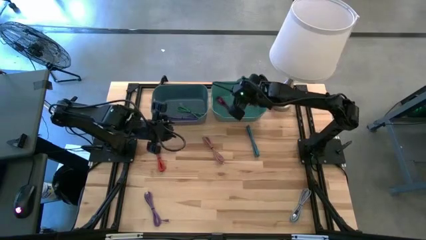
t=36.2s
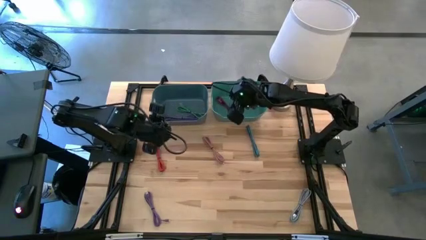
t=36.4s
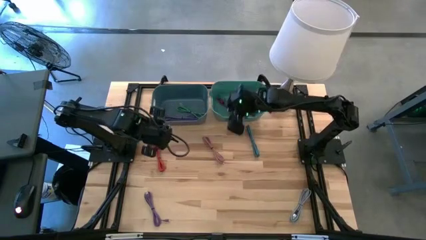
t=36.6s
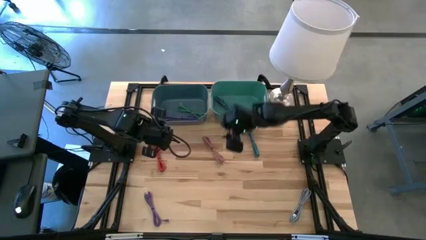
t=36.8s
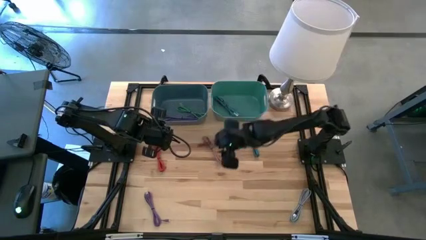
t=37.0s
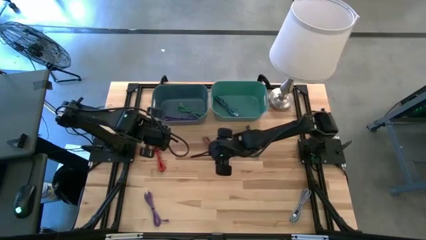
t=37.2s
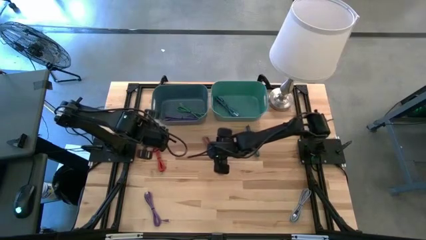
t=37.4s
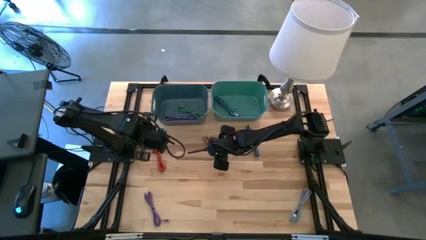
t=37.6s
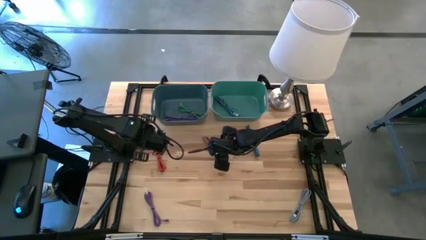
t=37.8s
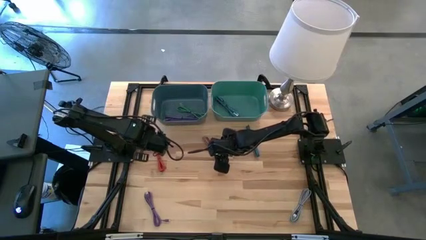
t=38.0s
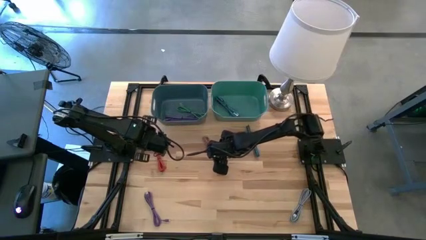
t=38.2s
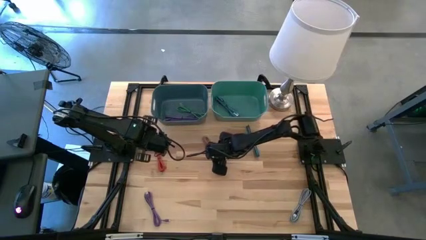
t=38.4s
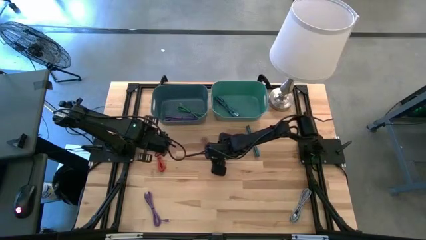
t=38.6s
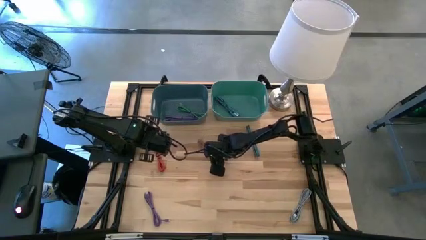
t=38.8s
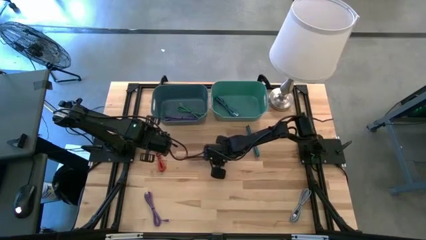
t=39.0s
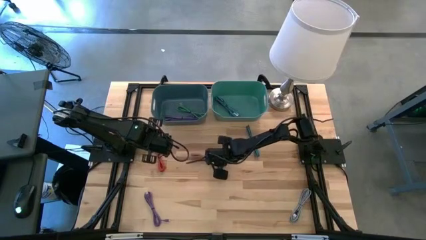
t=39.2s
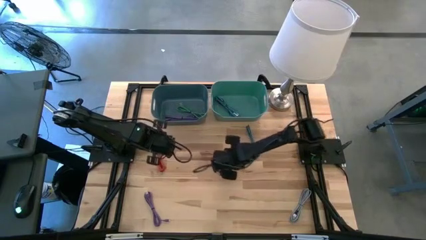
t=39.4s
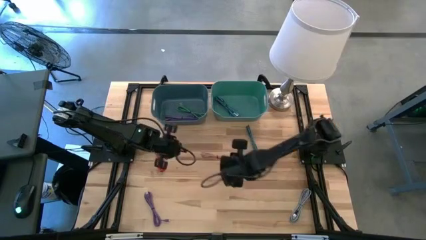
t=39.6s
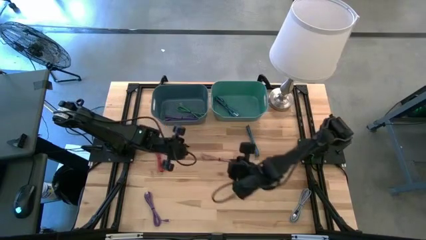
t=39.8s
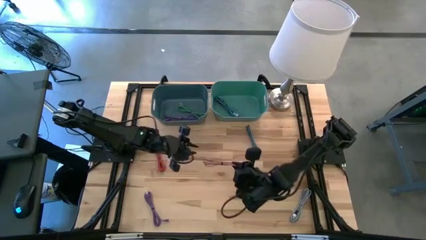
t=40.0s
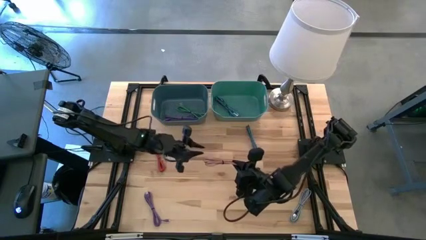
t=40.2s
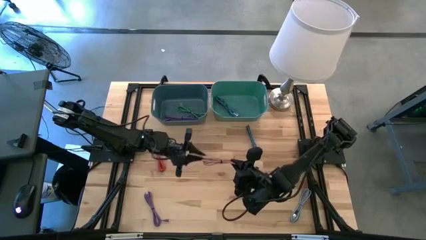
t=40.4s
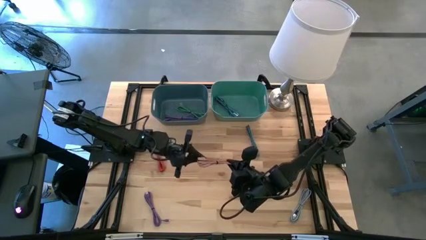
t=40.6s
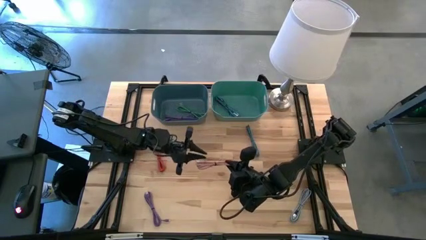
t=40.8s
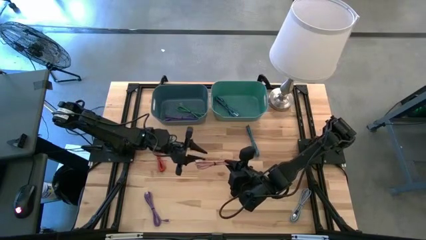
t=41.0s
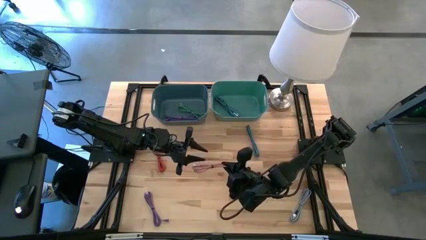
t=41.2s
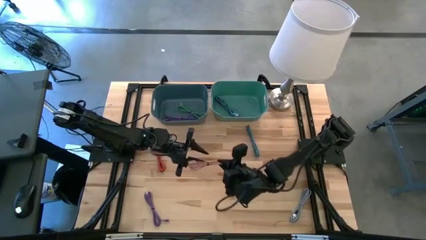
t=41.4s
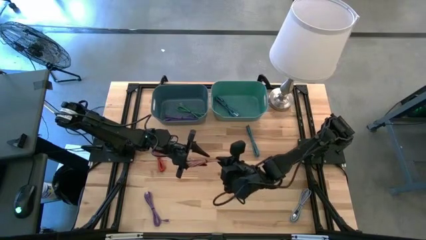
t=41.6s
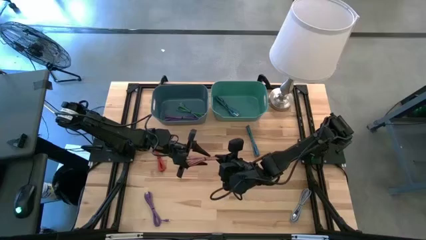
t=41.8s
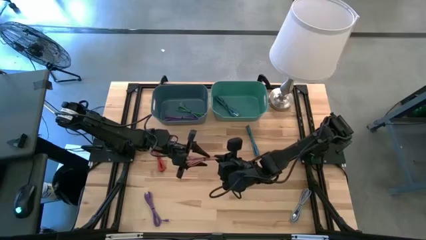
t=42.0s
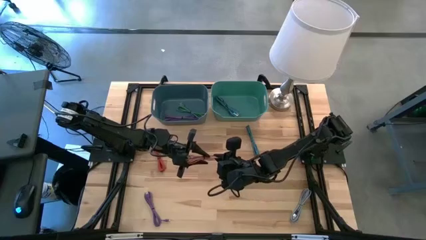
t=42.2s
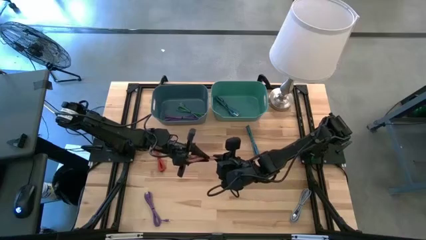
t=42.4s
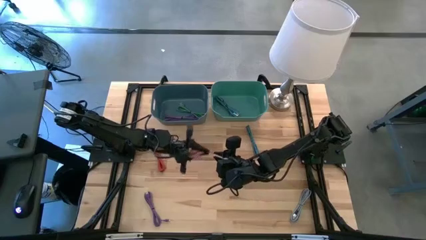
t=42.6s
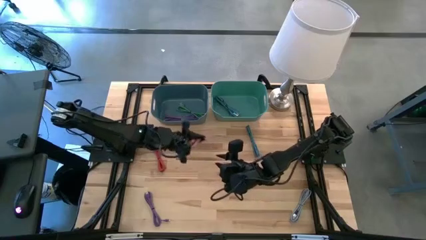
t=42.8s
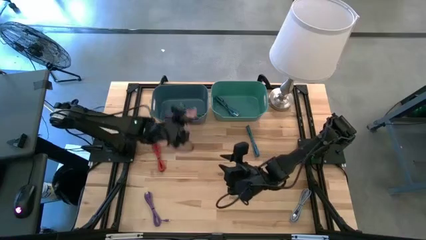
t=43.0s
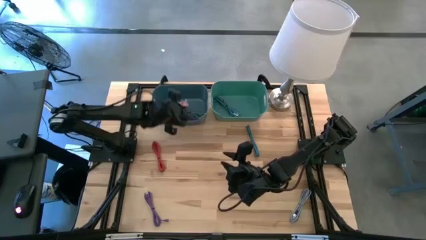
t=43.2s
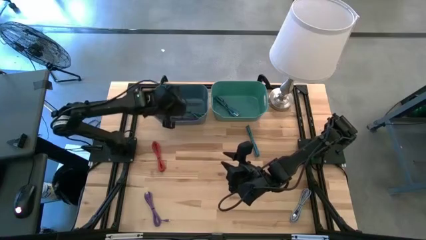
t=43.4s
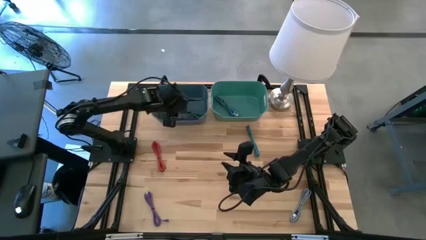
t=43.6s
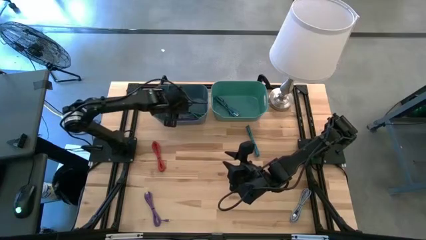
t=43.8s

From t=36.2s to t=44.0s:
Task: Pick & Place USB Port
Put the pink usb cable into the blue bin

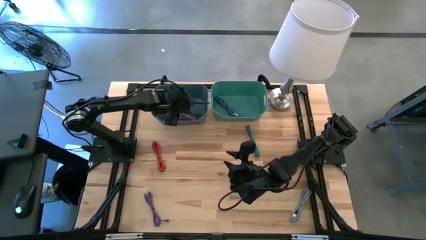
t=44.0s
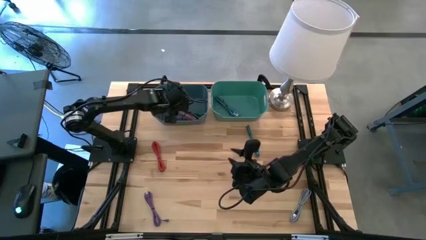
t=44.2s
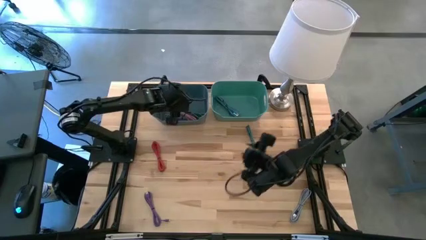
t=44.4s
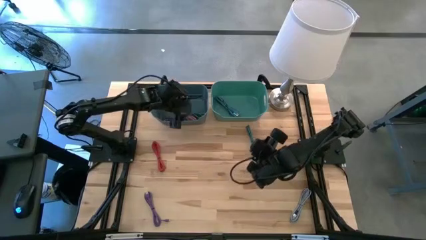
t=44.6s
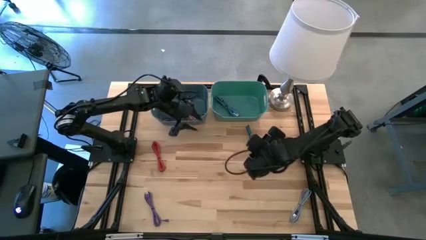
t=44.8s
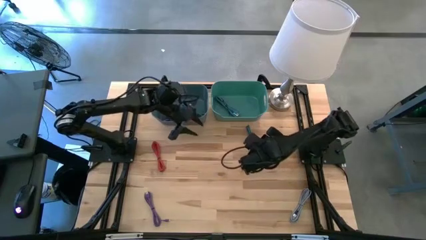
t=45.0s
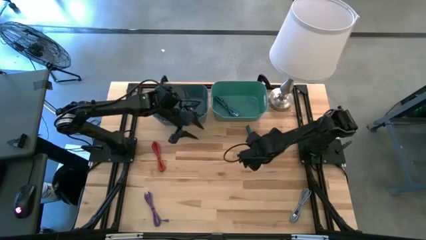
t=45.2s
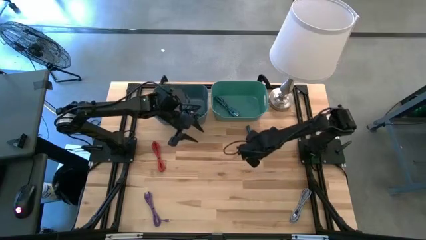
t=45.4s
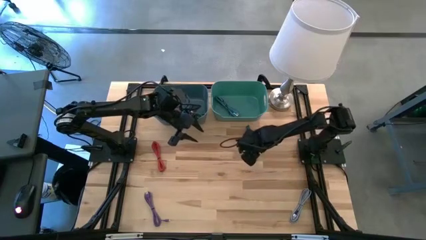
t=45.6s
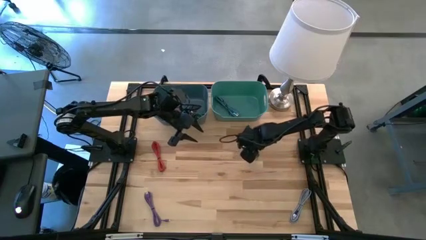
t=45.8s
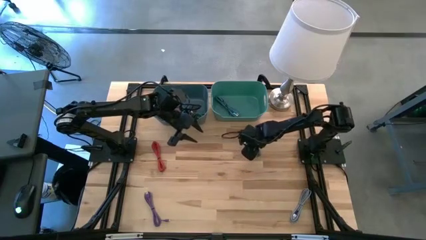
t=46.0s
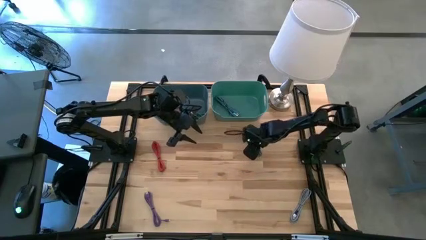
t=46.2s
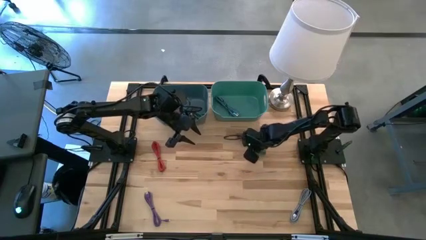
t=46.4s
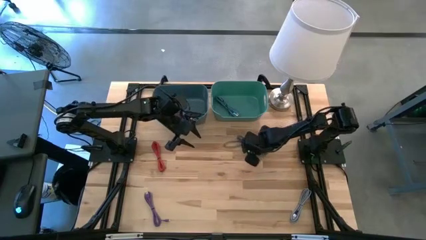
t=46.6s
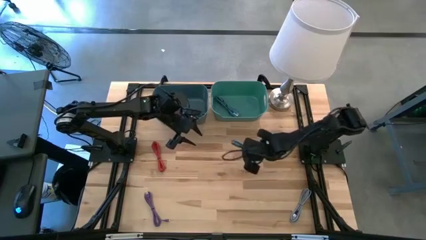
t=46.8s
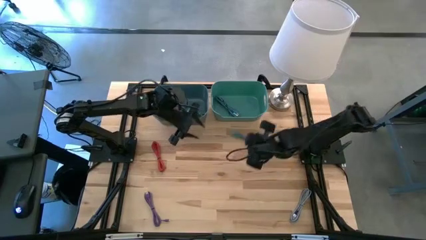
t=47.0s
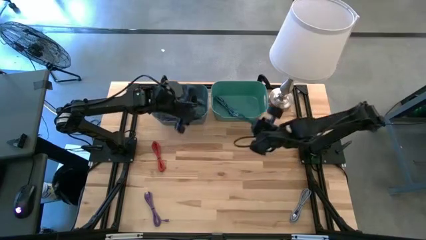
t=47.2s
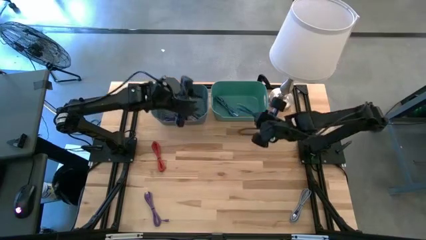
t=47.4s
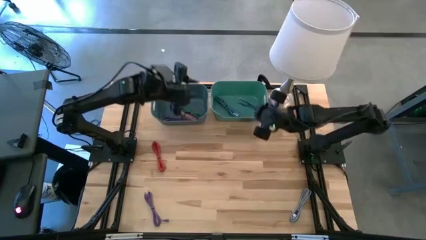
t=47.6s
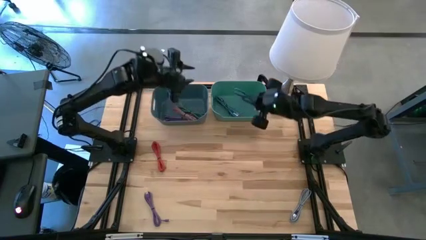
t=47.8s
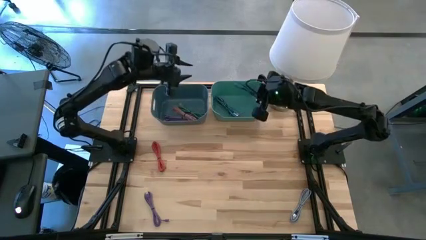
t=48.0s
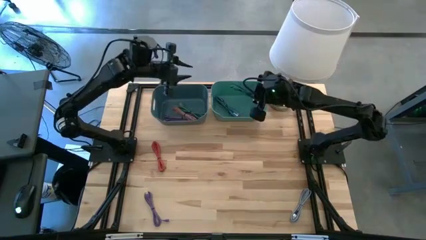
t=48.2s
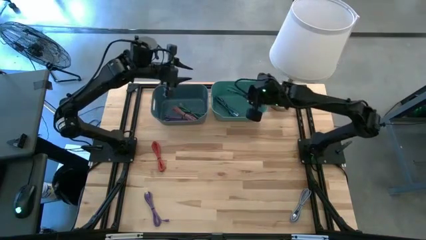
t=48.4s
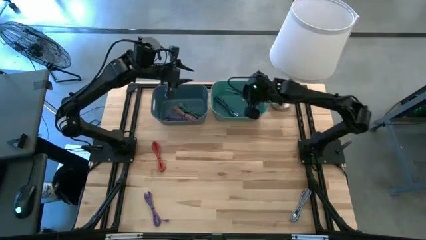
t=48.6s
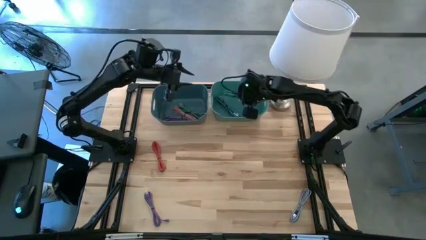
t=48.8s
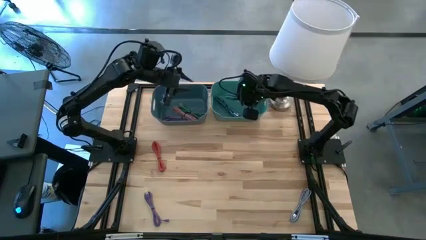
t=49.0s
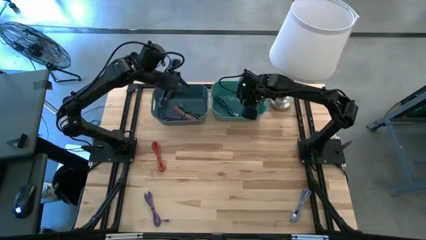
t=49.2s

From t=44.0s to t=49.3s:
Put the blue usb cable into the green bin

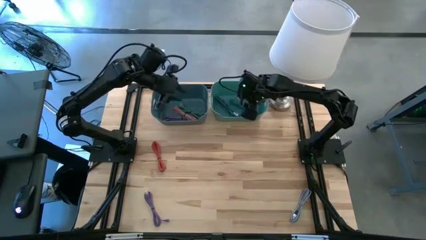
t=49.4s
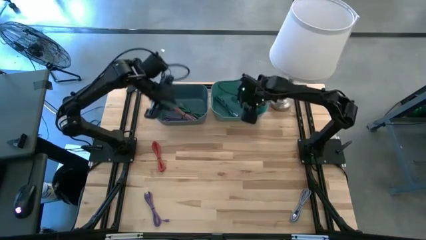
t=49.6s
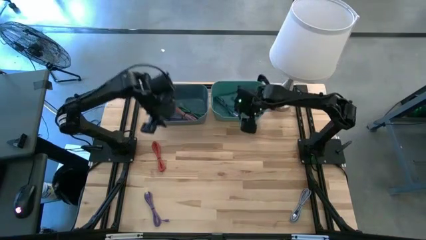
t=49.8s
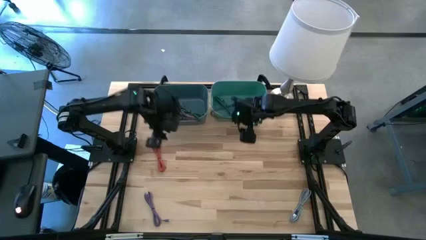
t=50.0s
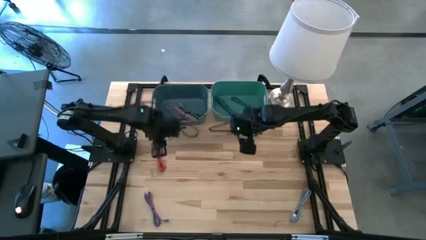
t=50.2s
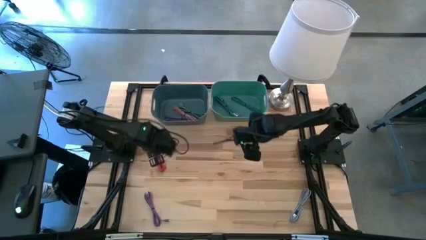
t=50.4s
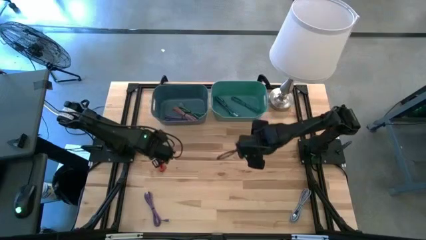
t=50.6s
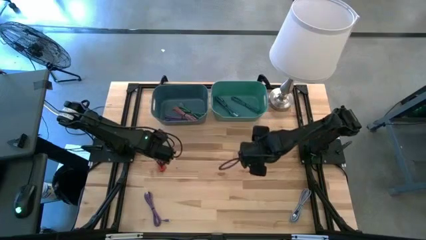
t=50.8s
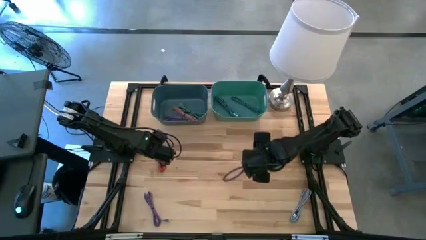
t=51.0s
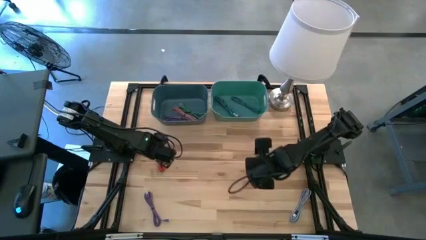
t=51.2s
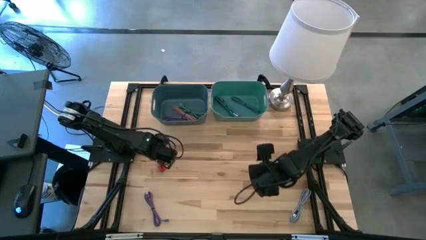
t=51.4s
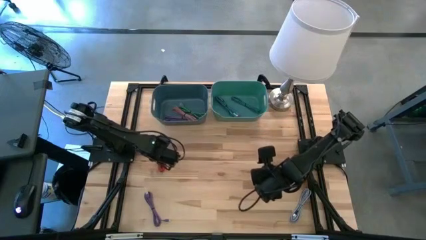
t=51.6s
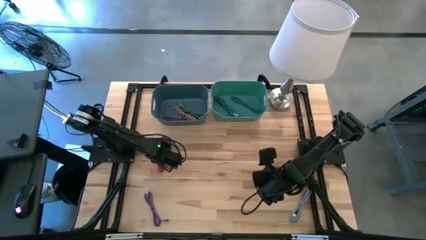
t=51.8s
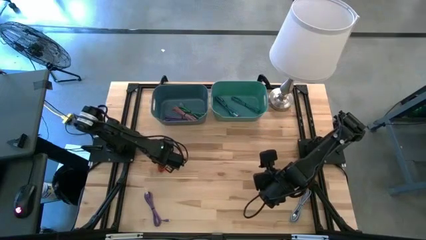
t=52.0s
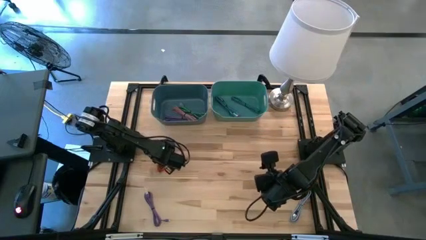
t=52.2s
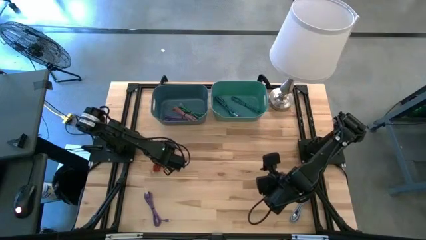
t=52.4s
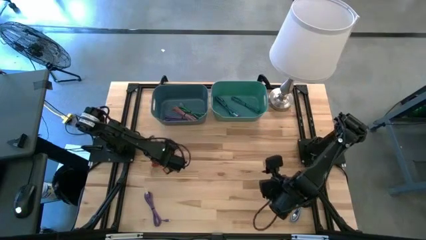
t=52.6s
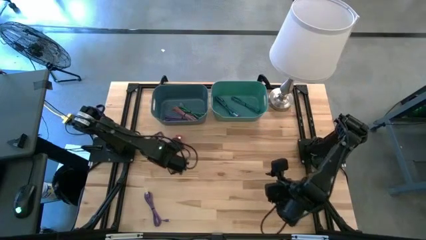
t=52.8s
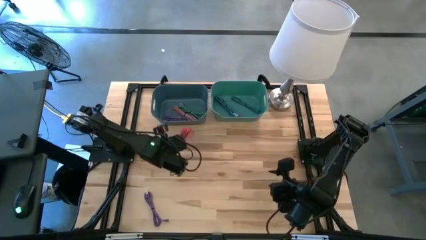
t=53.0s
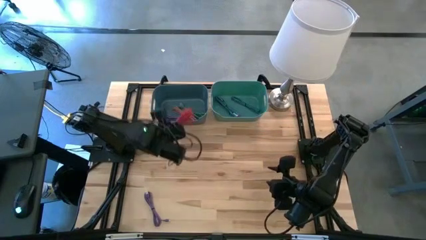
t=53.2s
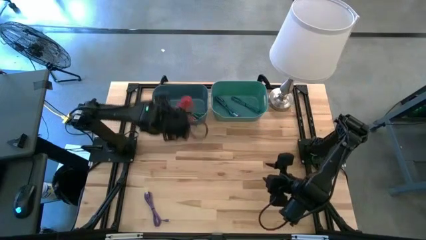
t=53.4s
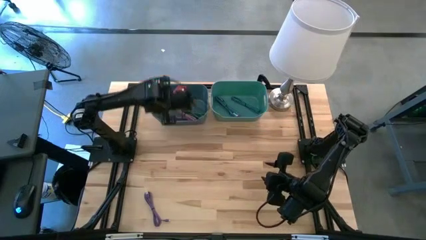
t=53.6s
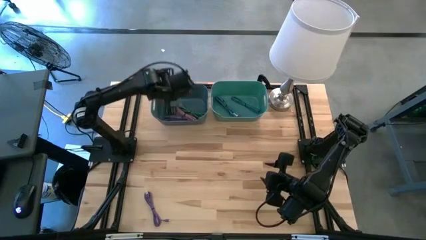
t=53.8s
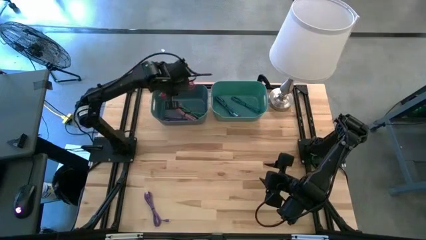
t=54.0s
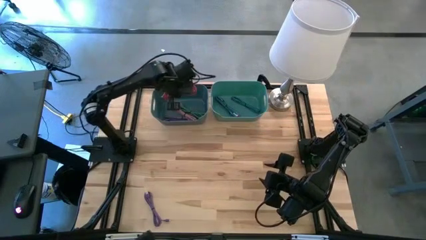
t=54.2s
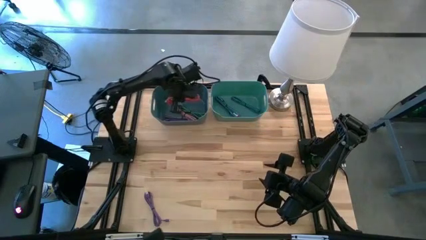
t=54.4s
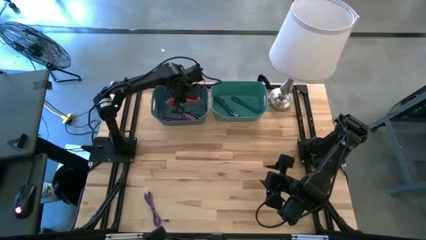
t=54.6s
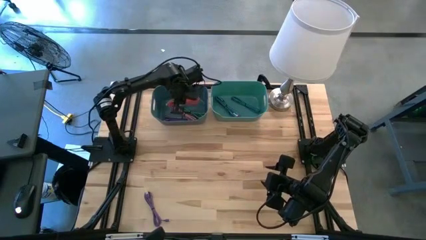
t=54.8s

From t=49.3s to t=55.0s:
Put the orange usb cable into the blue bin
